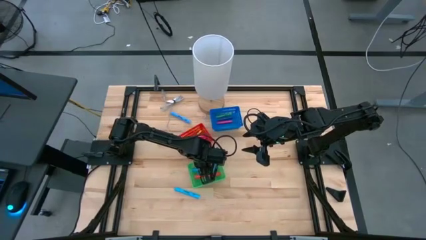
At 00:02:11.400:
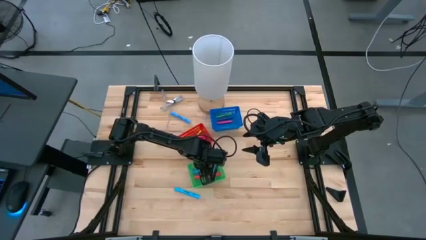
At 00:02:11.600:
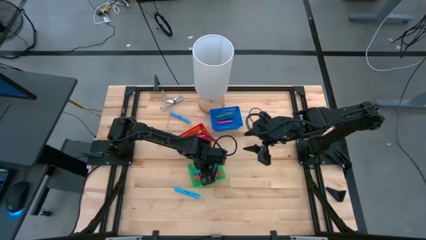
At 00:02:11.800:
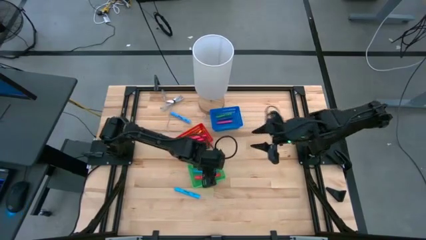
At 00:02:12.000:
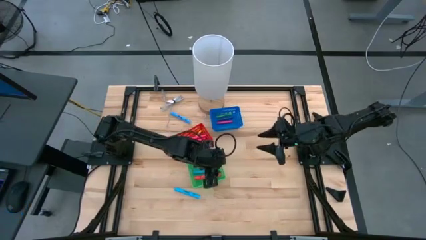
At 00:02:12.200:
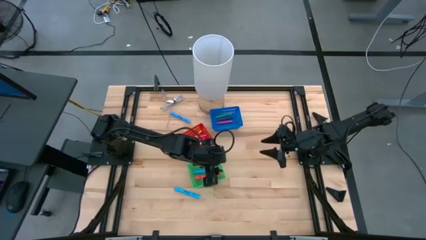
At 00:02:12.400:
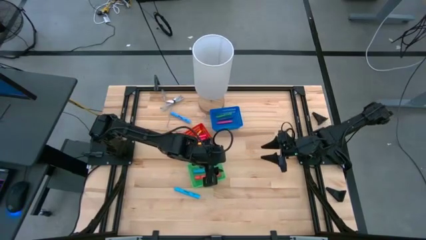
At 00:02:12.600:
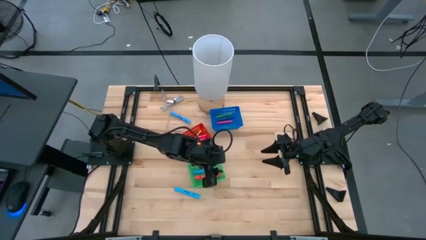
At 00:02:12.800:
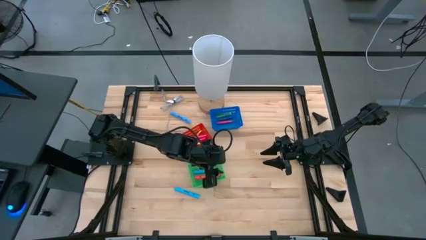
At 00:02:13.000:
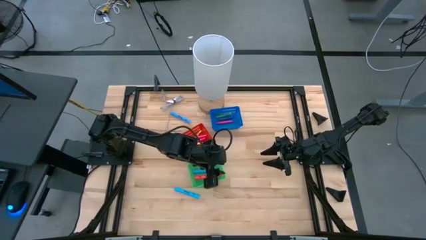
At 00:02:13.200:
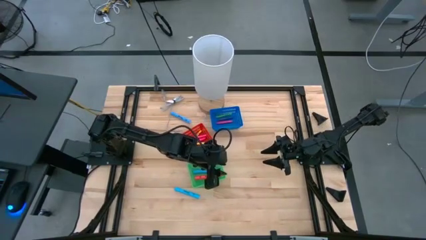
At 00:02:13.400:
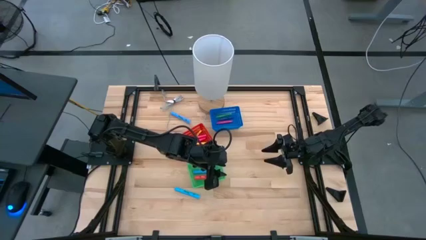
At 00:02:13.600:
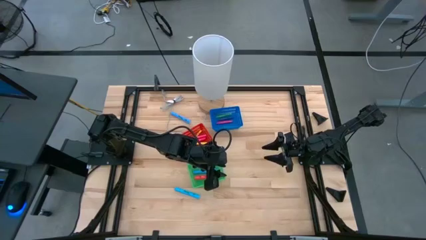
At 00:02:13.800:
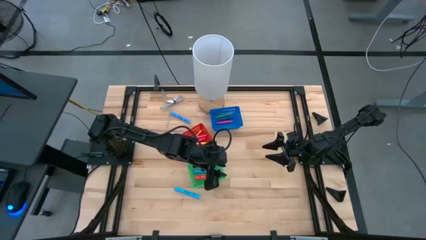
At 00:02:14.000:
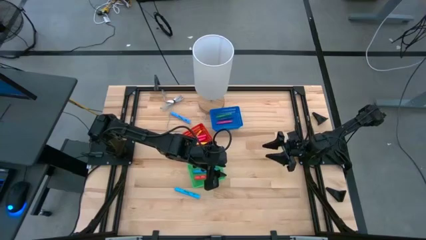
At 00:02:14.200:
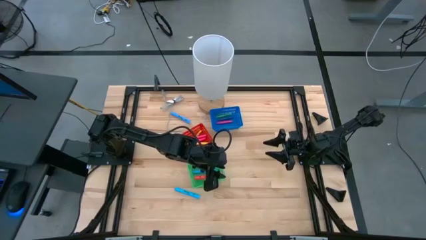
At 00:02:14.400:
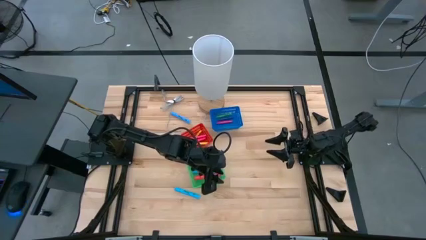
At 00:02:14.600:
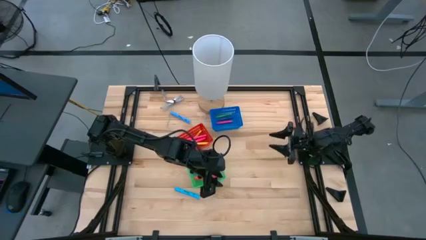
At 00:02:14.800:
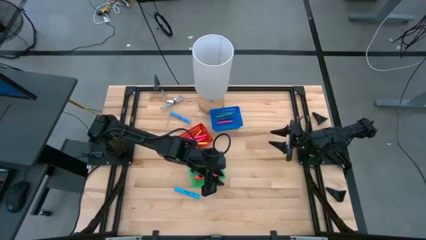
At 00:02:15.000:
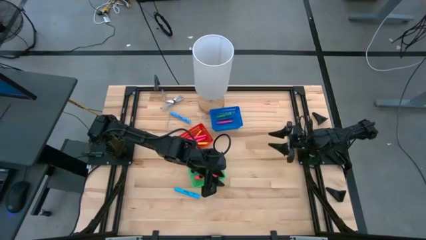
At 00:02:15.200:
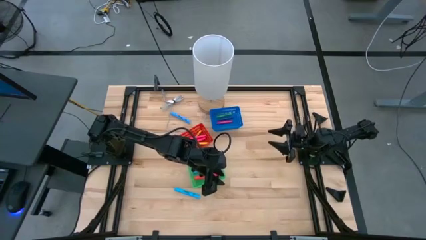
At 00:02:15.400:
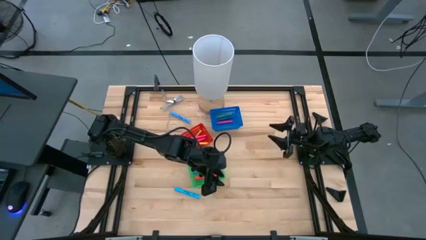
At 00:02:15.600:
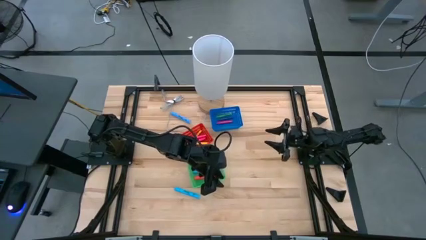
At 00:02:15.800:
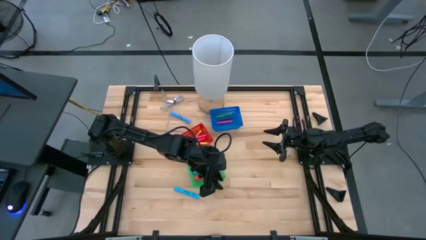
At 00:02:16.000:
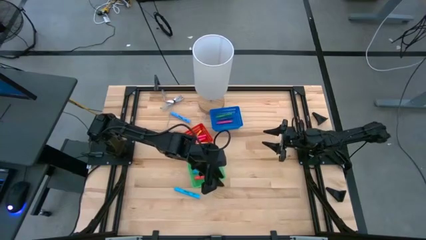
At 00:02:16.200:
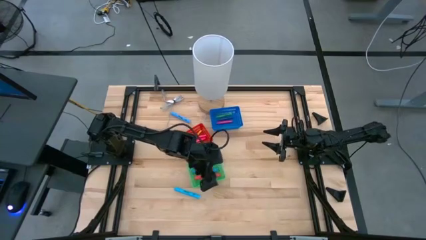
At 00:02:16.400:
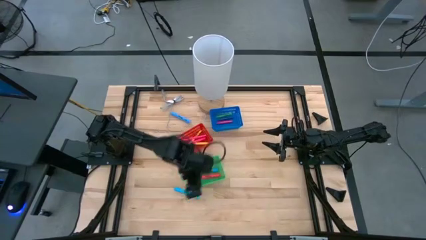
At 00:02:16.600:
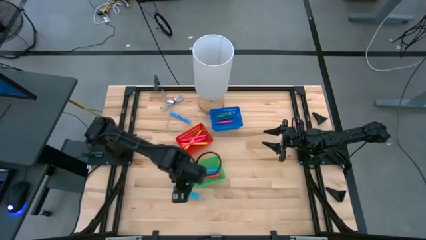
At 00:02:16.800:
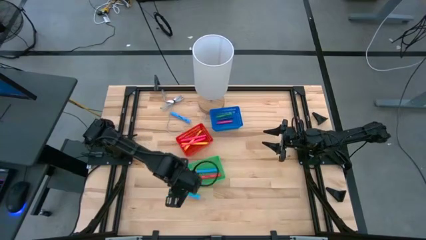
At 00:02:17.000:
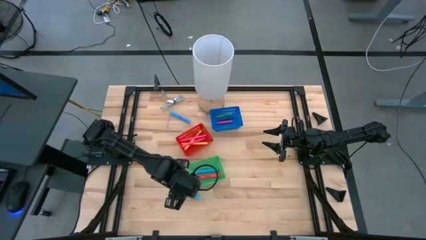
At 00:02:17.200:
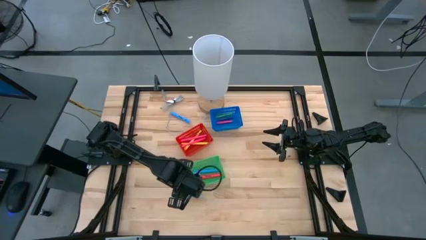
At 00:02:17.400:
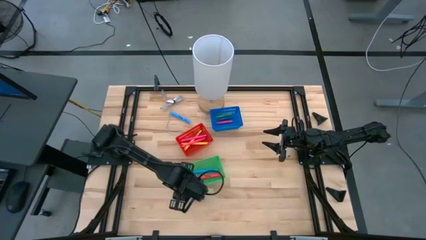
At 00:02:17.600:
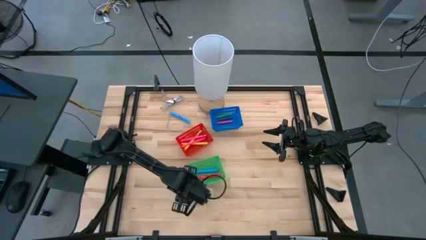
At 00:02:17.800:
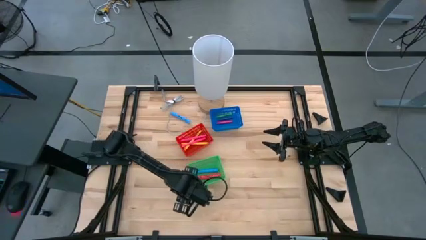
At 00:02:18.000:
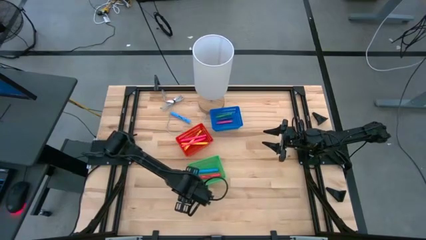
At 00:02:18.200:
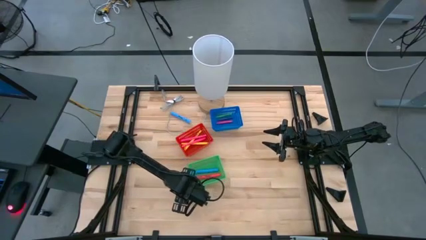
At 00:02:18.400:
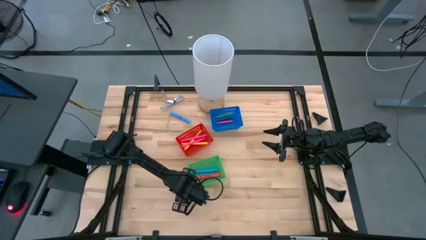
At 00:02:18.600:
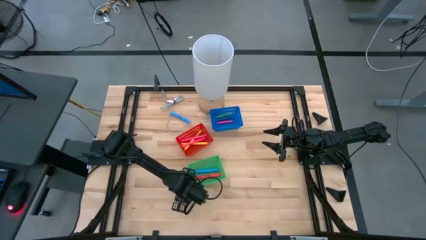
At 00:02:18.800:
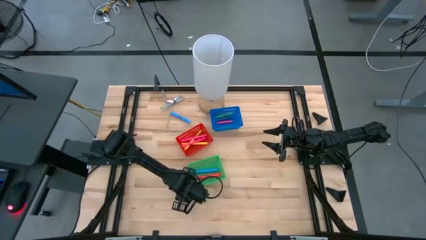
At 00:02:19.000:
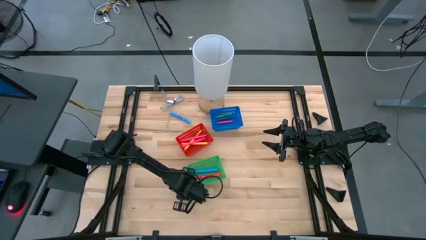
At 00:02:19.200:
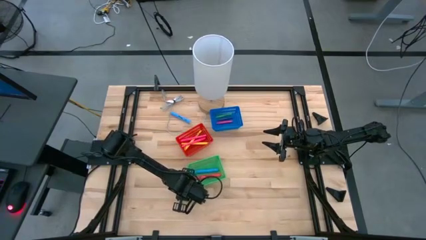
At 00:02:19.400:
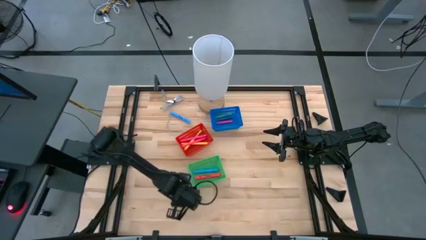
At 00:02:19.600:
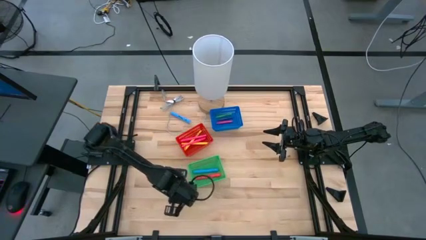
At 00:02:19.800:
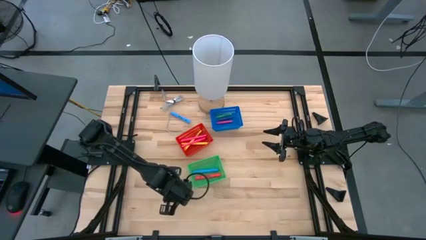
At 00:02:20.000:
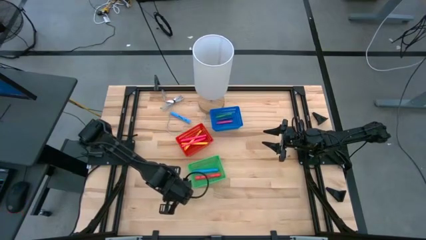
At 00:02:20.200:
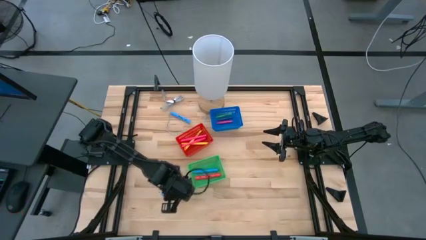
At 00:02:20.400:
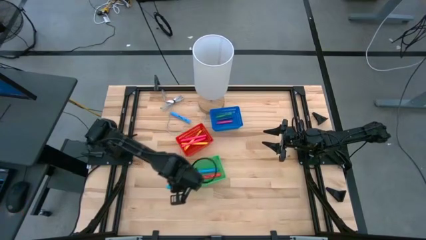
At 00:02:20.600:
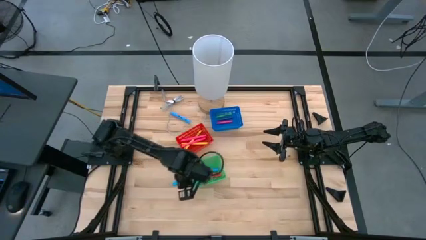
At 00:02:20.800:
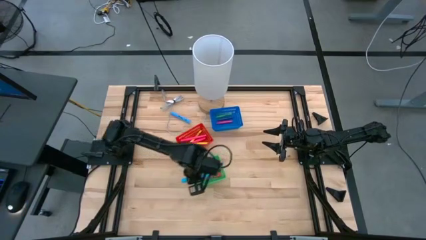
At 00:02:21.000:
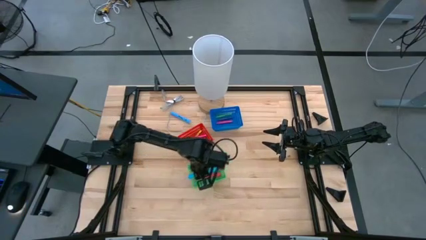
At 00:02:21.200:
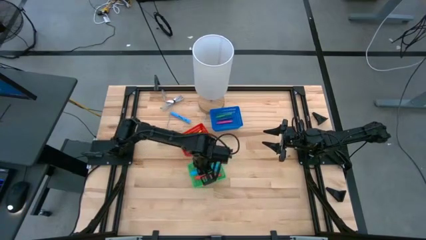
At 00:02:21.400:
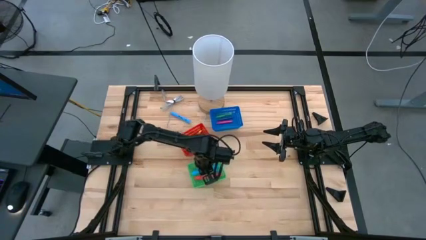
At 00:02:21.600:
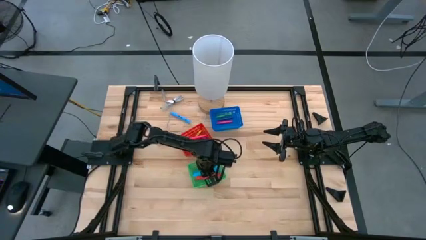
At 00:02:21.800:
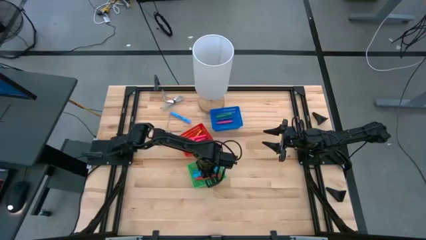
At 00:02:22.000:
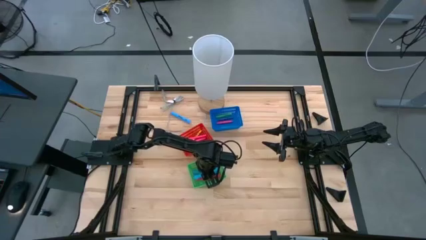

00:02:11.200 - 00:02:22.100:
Task: Pick & Place Markers
Put the bottom blue highlighter into the green bin

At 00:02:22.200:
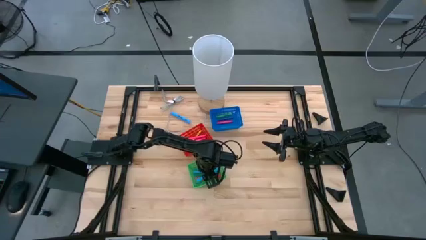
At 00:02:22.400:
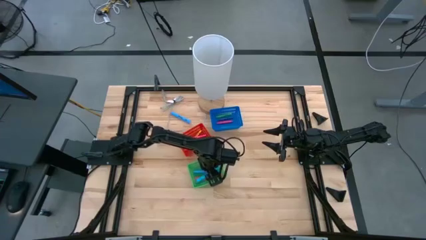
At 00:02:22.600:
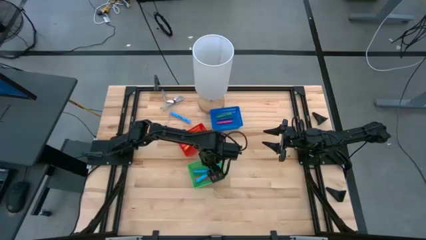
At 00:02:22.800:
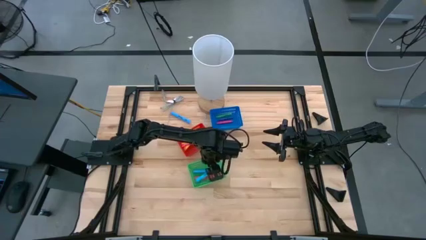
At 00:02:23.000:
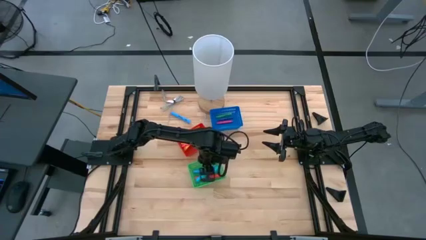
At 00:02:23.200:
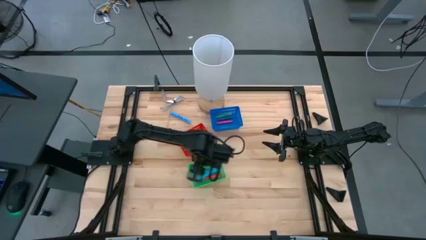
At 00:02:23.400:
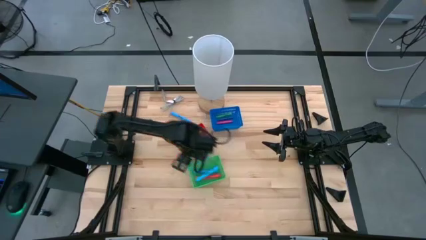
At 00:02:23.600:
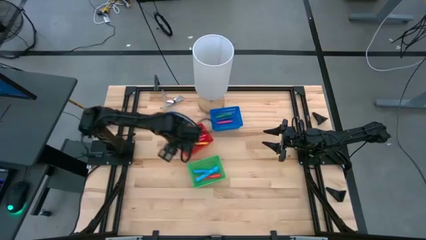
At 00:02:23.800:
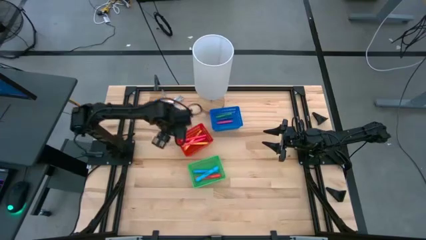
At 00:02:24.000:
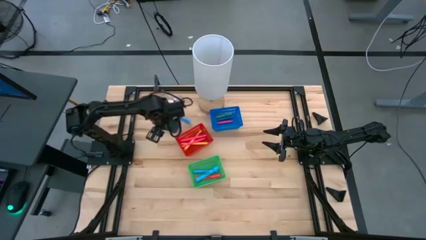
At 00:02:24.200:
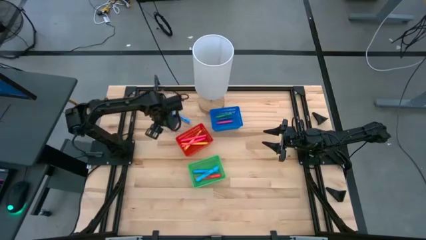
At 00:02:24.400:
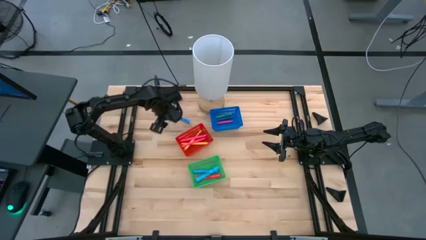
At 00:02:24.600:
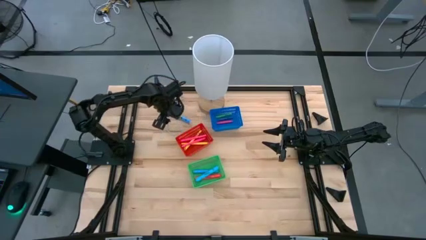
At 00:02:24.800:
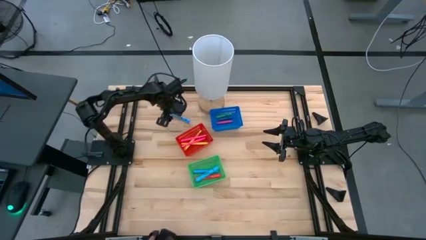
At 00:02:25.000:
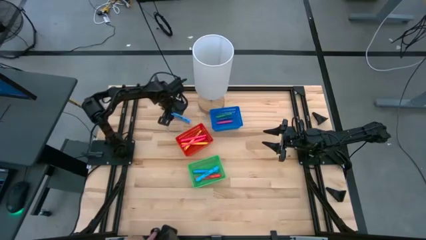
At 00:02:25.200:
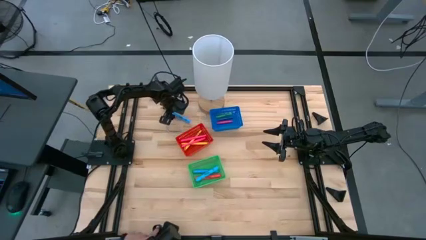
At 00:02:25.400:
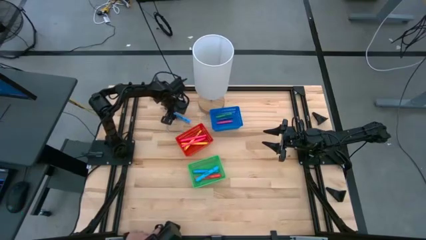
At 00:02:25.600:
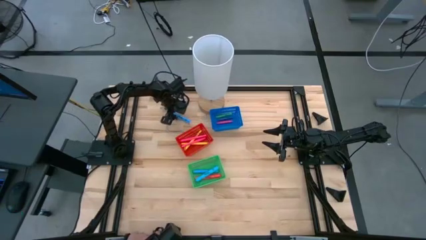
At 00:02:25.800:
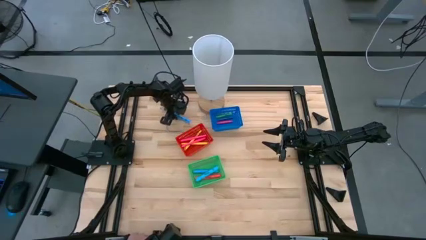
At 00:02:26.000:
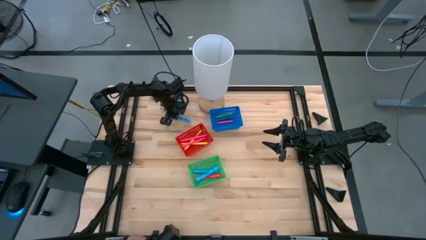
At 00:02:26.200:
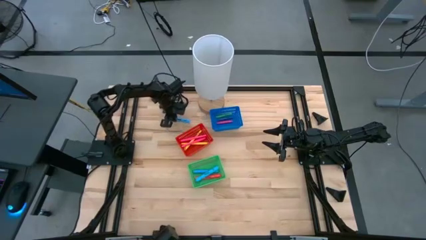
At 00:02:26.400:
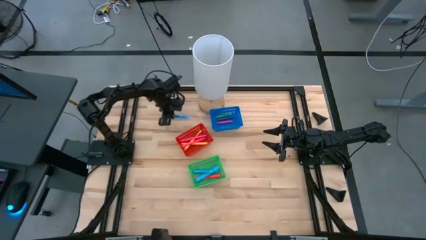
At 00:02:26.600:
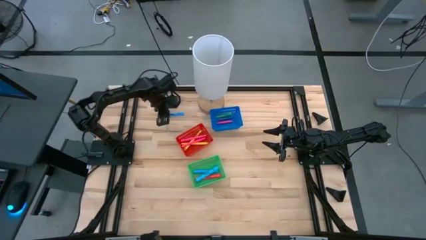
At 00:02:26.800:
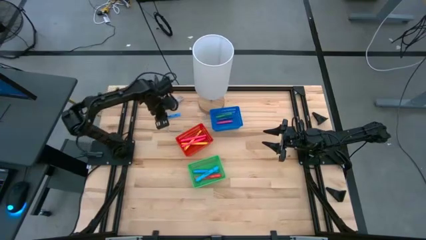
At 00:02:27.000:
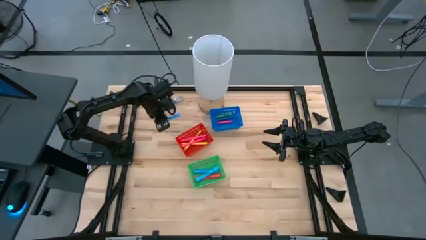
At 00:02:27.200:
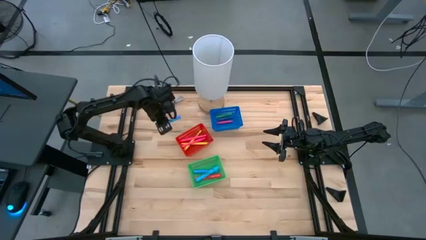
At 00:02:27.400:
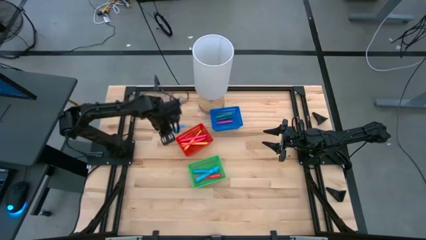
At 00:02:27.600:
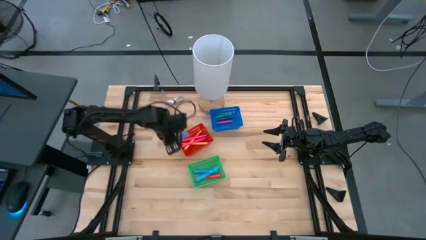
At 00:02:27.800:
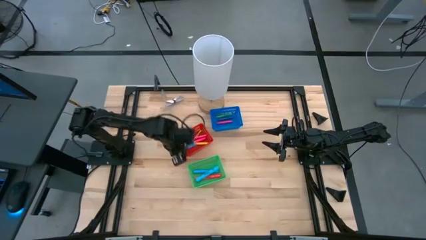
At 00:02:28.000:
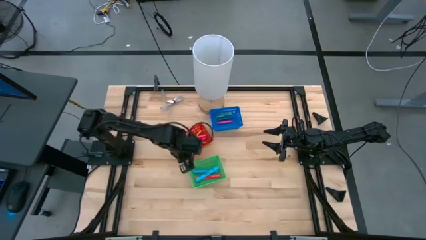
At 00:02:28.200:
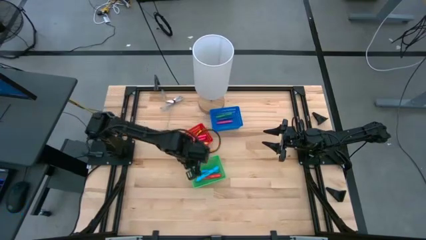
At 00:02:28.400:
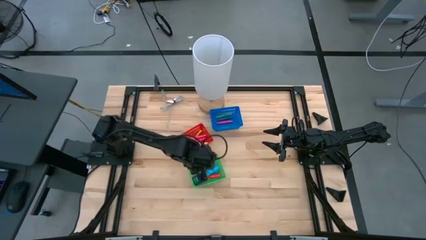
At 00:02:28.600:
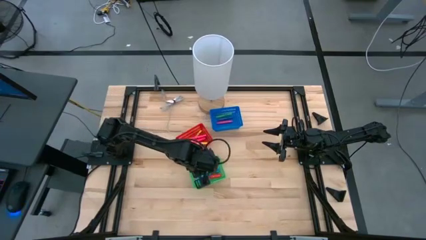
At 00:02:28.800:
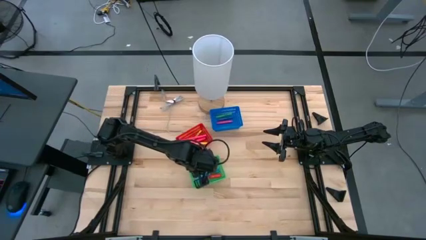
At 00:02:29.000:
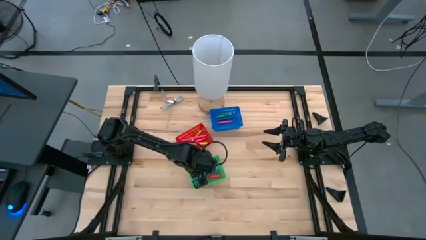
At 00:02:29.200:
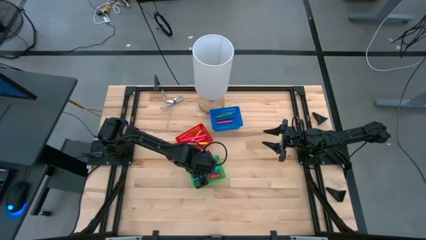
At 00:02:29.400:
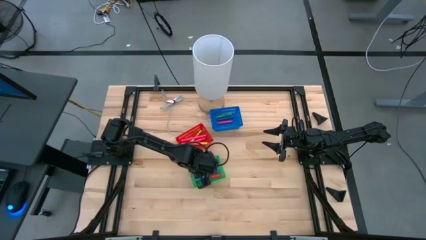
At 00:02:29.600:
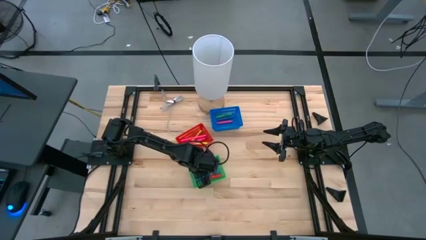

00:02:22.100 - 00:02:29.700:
Put the blue highlighter into the green bin
